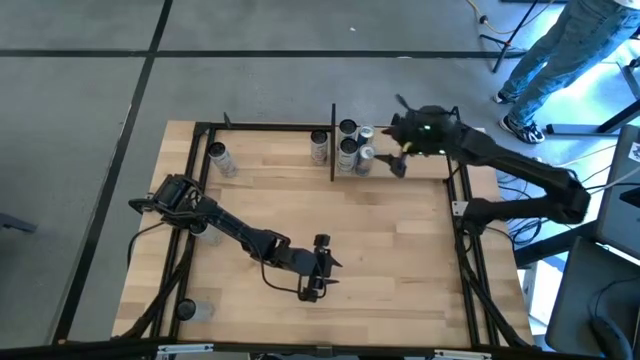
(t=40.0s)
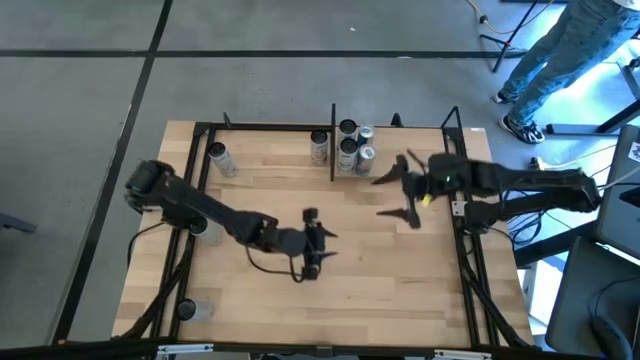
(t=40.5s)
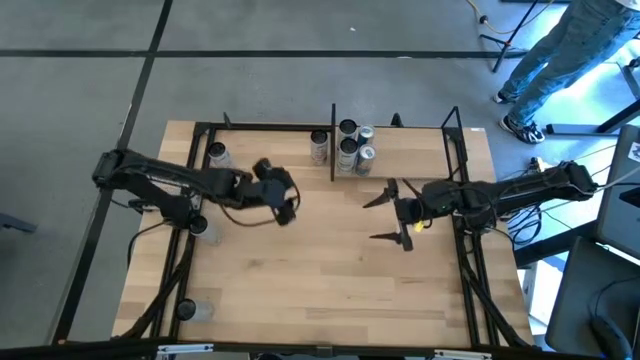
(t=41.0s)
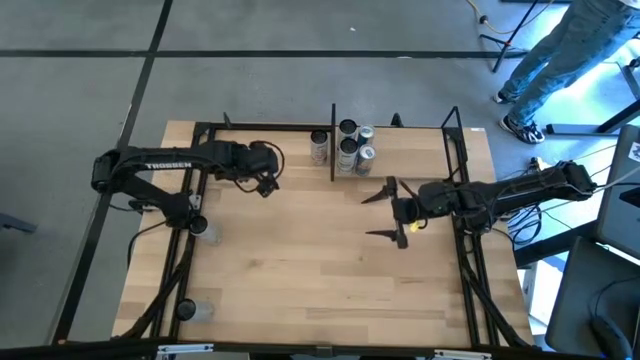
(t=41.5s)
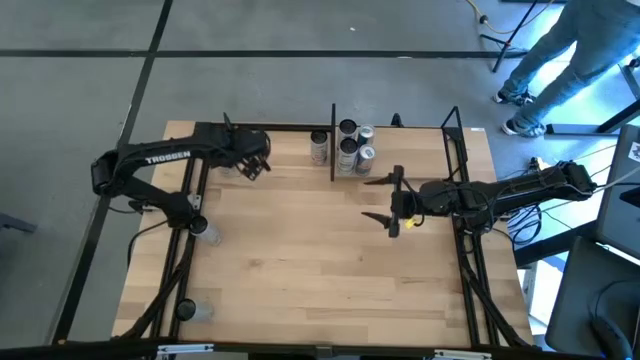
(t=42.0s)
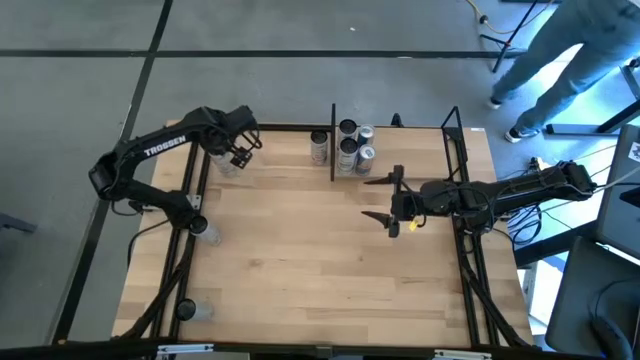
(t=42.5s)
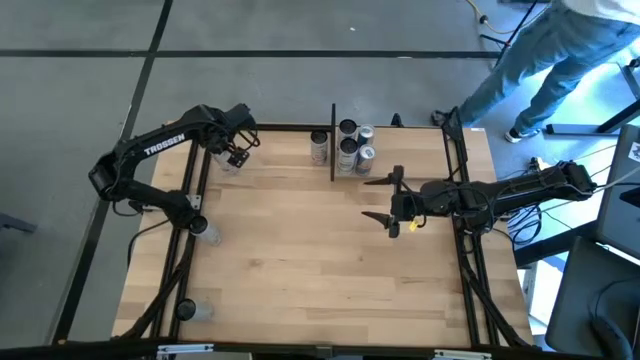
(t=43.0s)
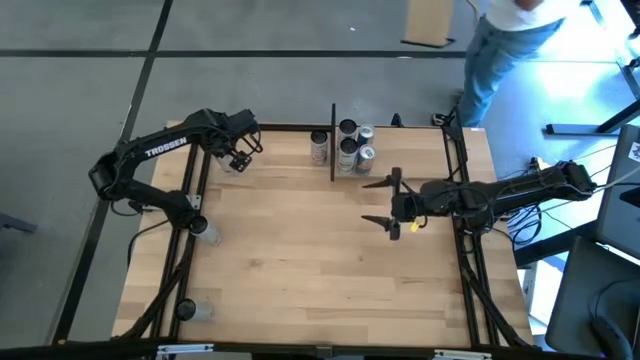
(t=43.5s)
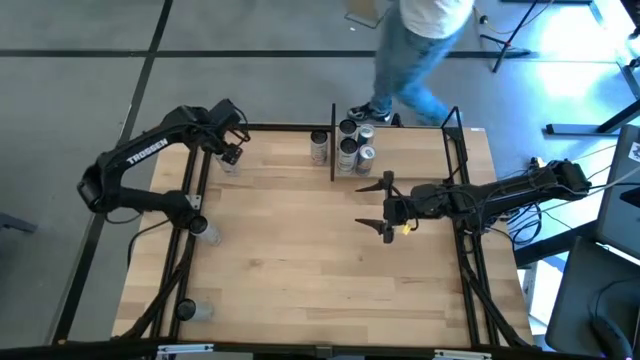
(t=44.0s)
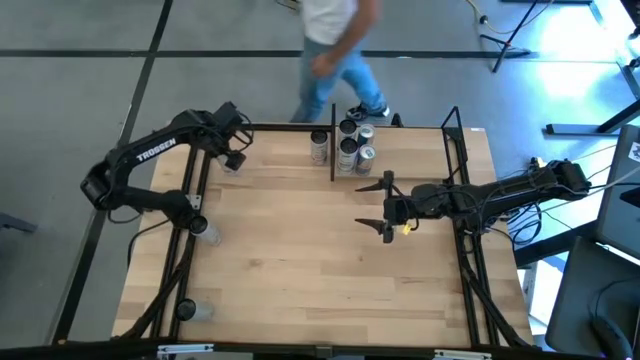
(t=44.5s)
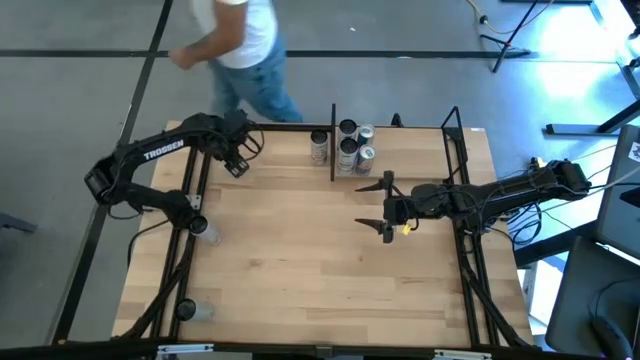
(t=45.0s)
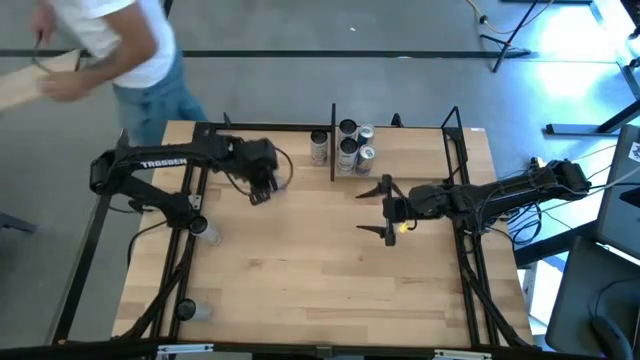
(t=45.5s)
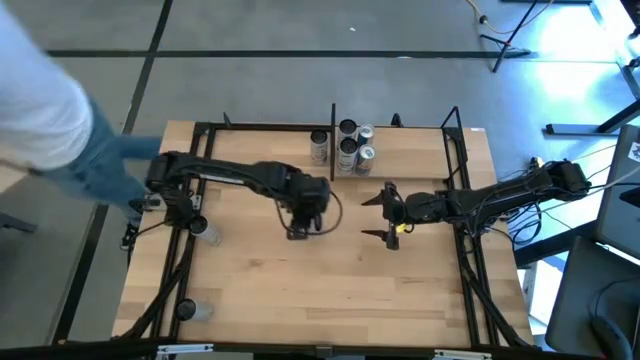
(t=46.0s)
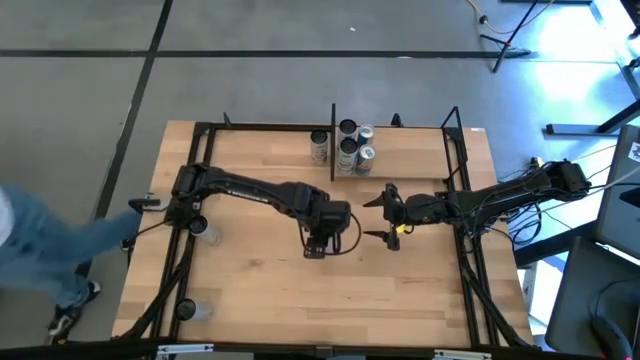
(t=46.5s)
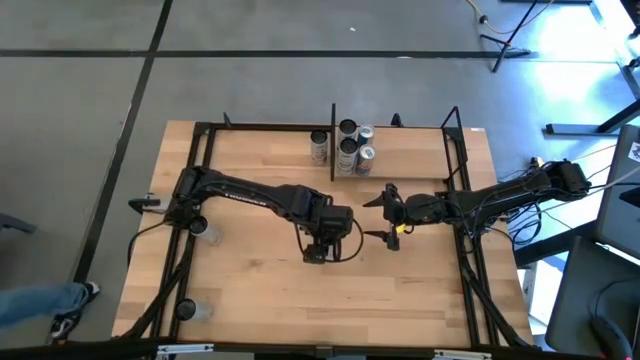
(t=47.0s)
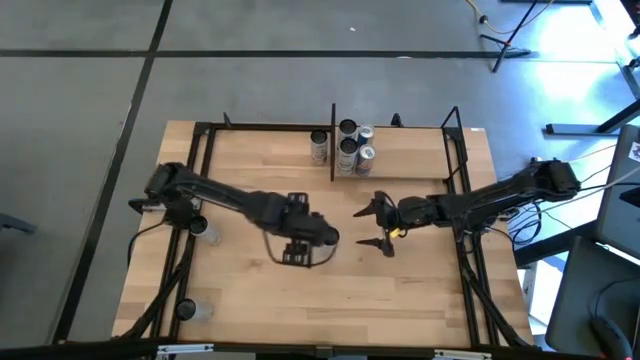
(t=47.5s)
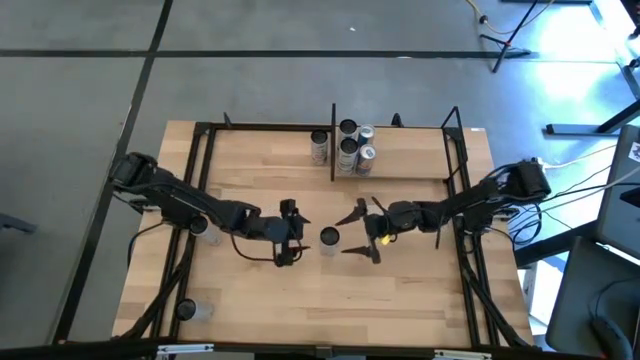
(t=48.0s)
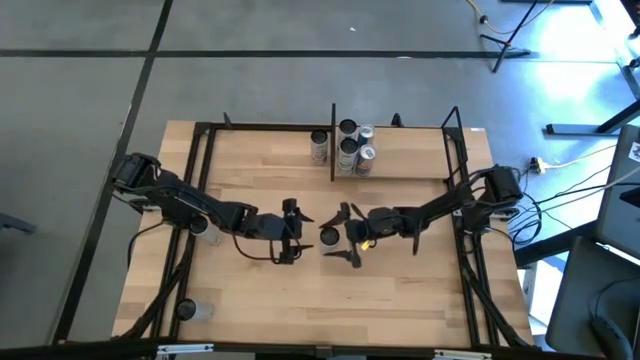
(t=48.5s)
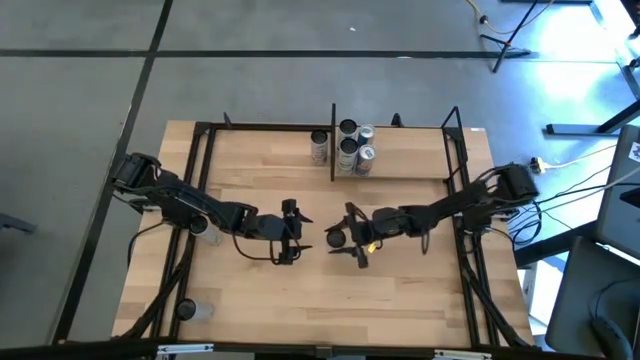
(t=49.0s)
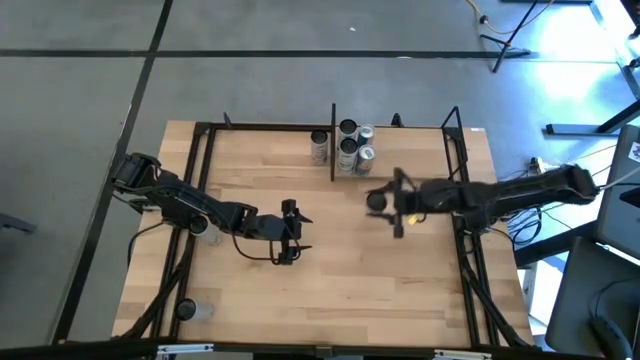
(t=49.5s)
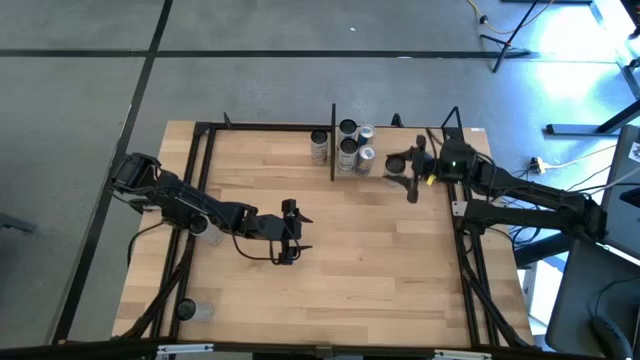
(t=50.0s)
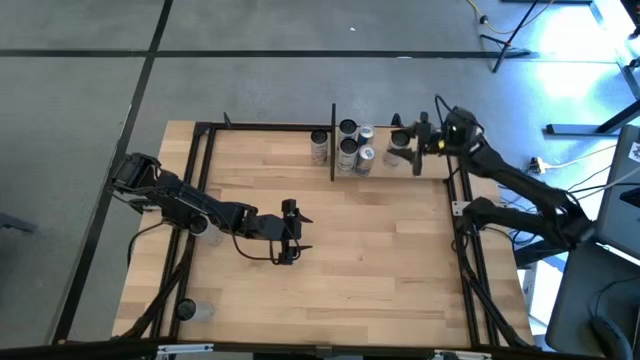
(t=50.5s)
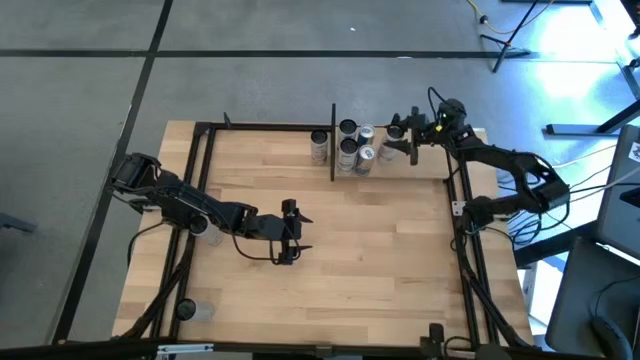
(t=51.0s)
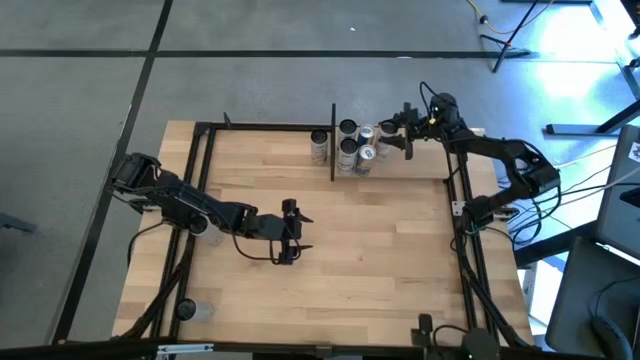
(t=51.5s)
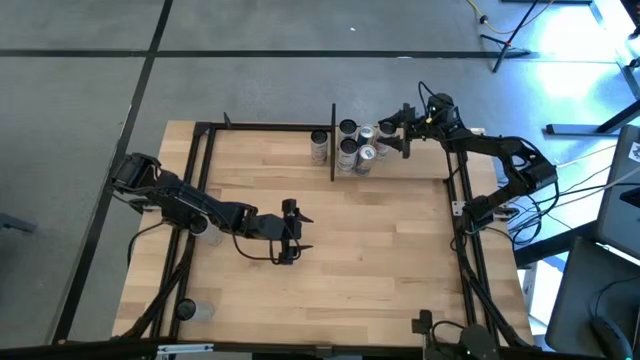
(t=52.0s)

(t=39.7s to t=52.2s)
Task: Place canned beverage on shelf
Put the top left black soda can on the shelf

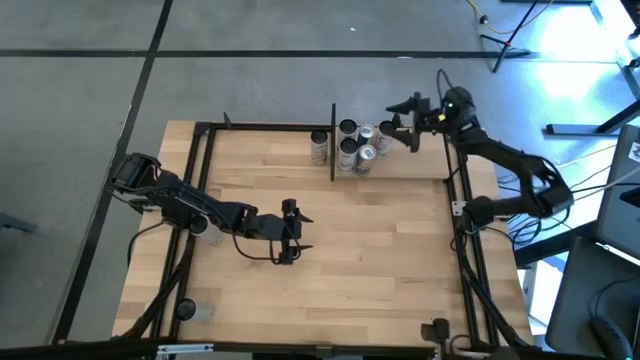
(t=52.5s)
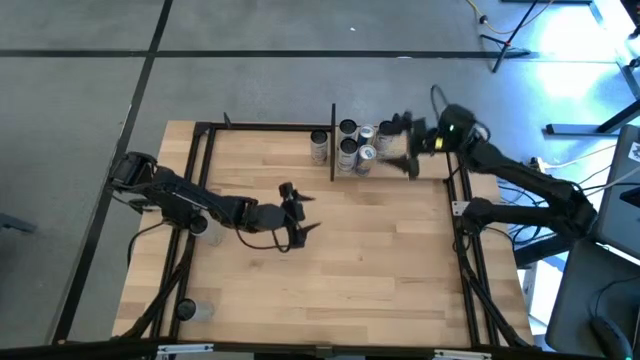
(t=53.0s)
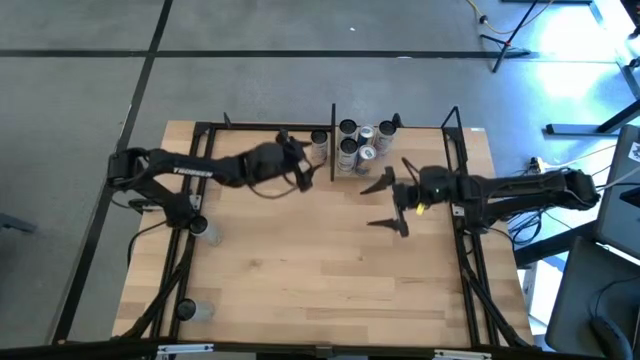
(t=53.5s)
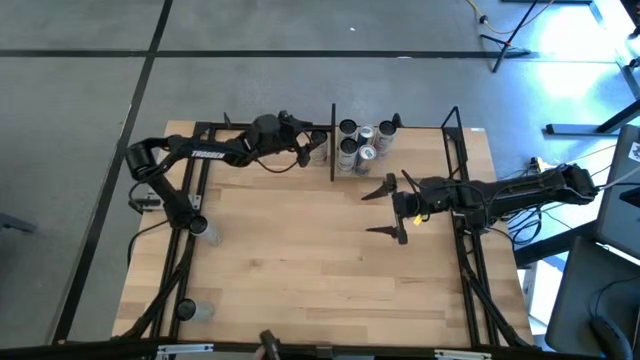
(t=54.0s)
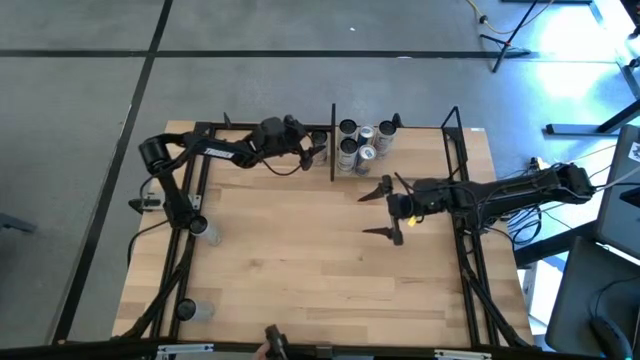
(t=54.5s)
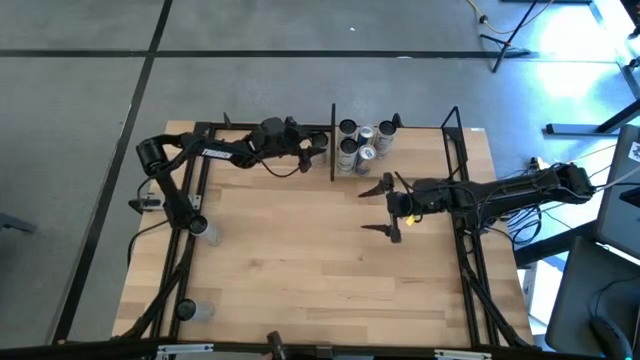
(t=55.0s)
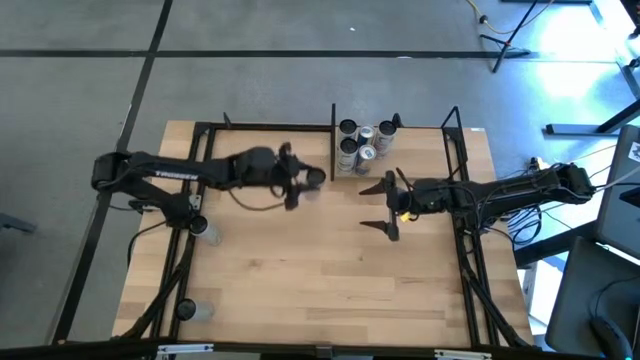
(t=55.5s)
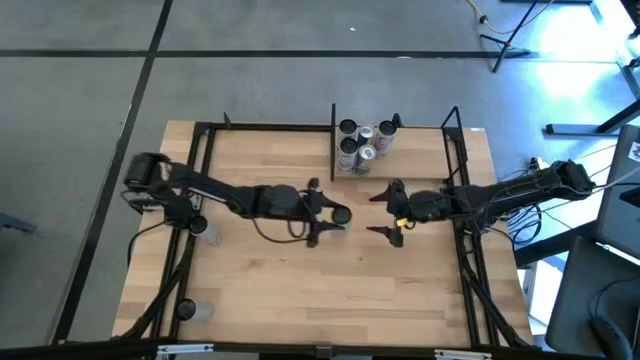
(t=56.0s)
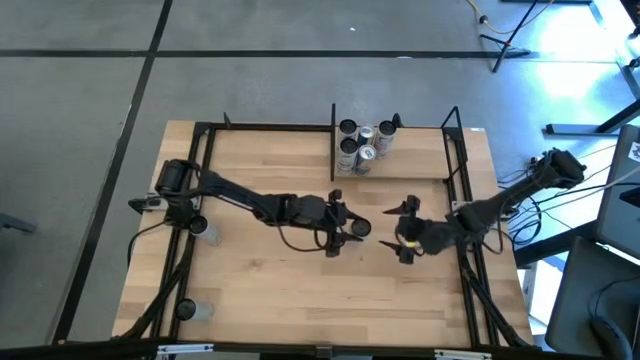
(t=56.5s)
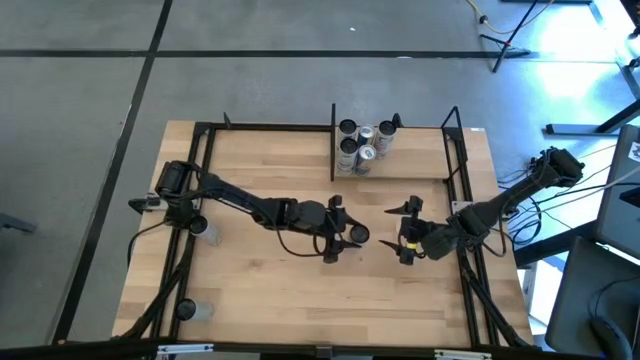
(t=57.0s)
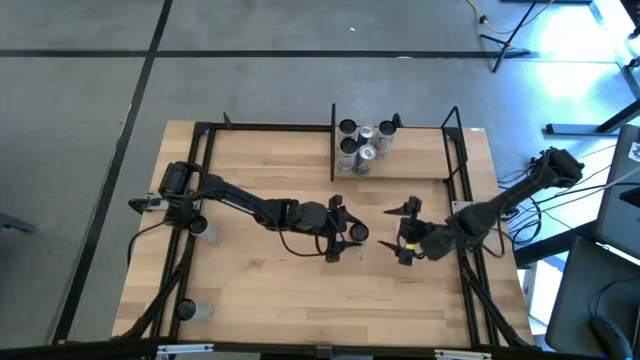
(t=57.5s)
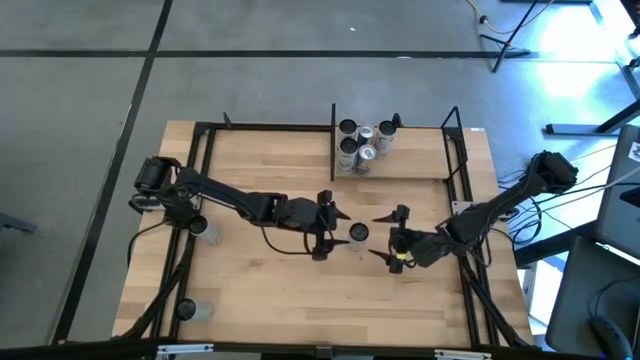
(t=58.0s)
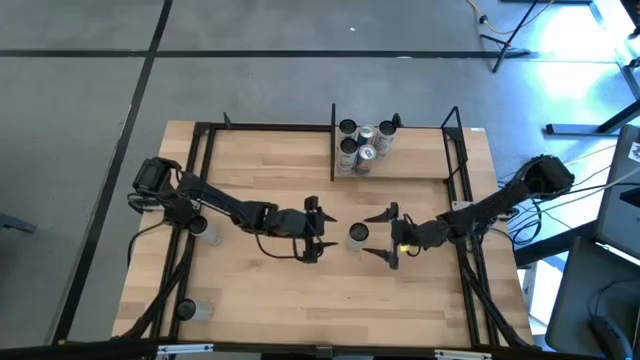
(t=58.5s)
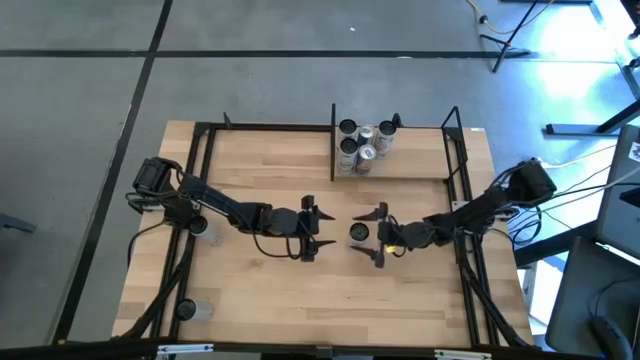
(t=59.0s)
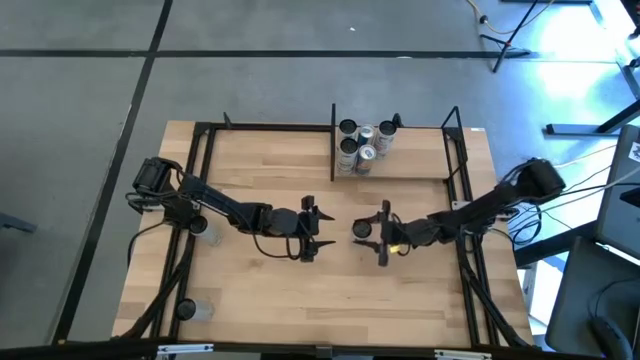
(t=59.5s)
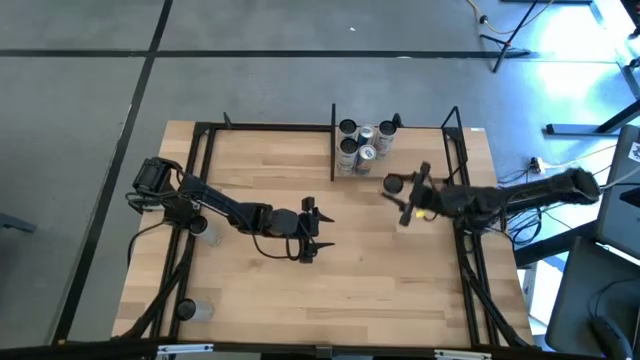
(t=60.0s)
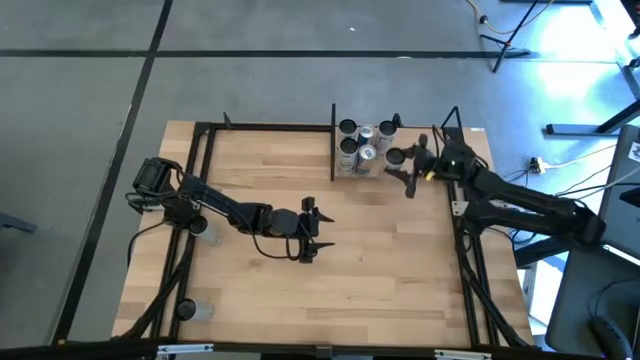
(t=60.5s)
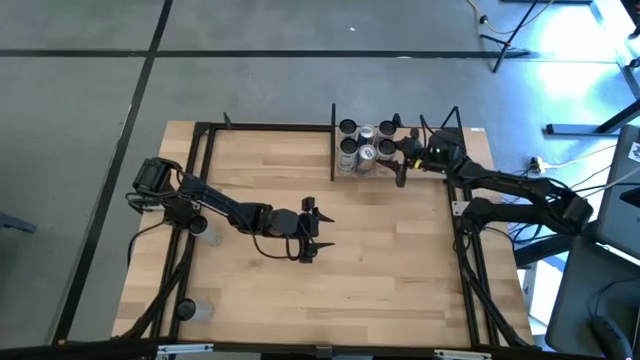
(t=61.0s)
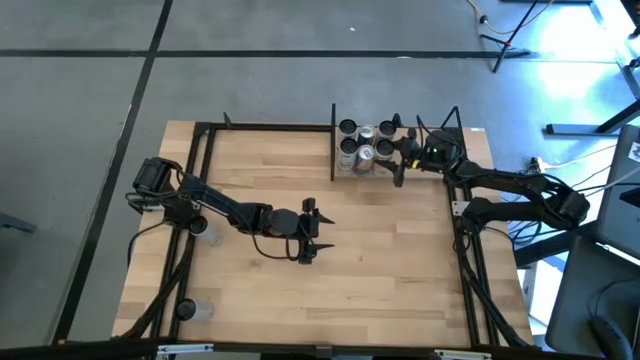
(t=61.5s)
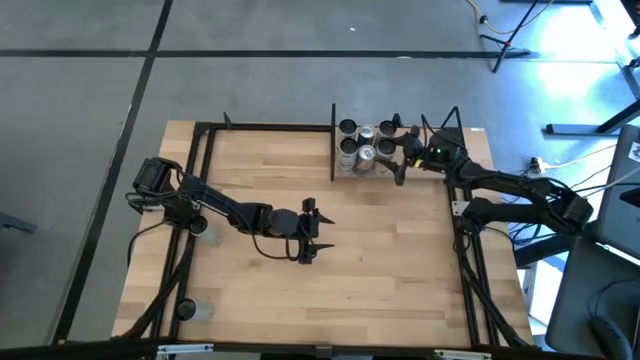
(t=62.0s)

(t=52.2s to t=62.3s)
Put the top black soda can on the shelf aligned with the other black soda can
